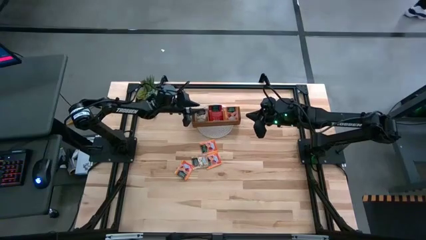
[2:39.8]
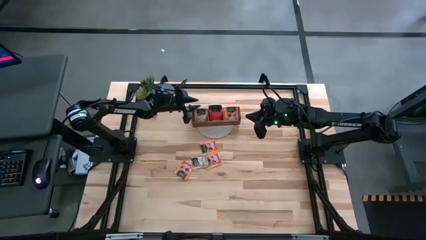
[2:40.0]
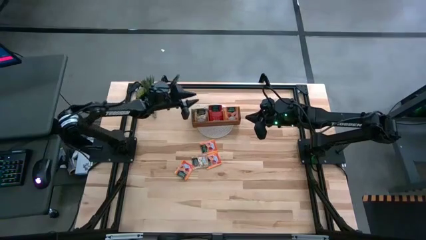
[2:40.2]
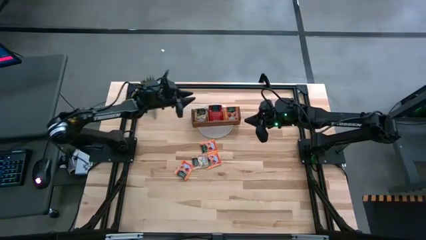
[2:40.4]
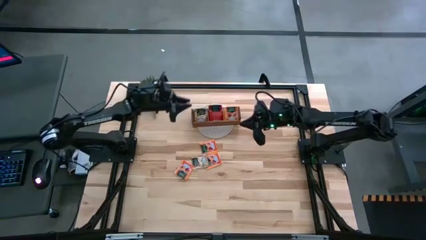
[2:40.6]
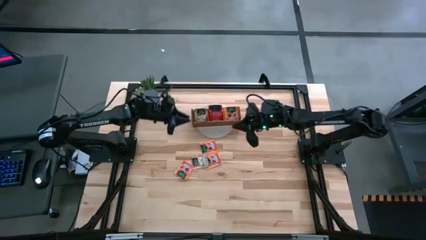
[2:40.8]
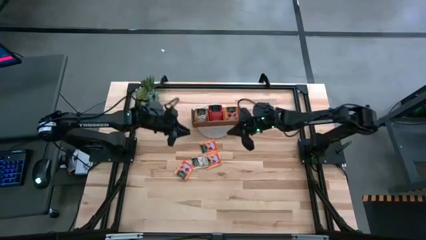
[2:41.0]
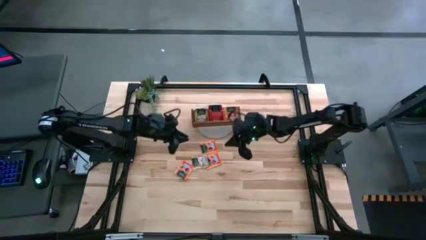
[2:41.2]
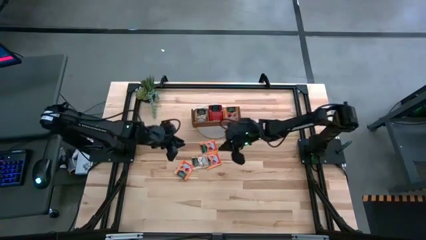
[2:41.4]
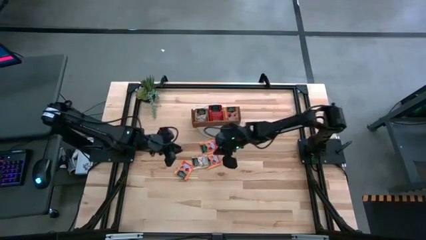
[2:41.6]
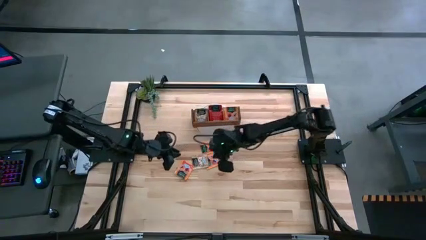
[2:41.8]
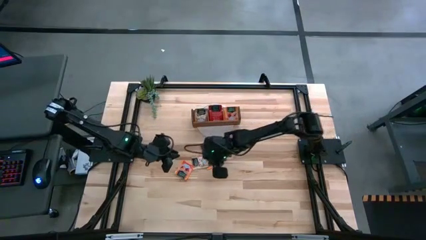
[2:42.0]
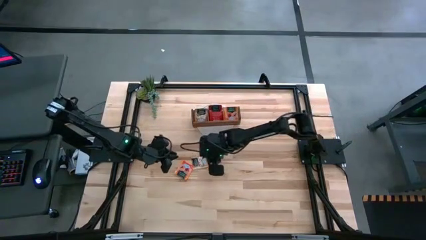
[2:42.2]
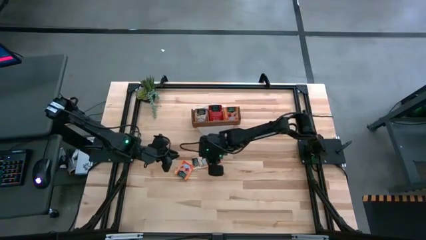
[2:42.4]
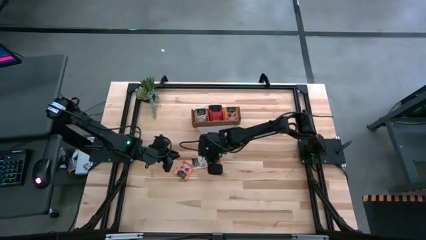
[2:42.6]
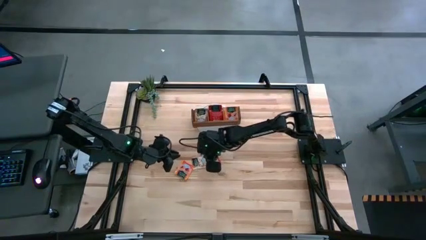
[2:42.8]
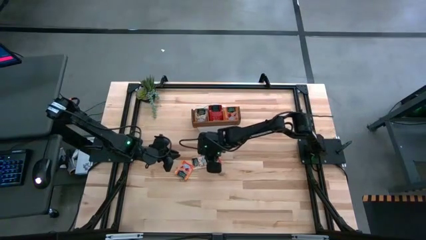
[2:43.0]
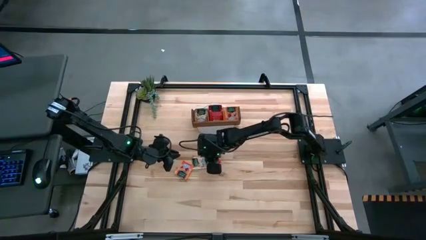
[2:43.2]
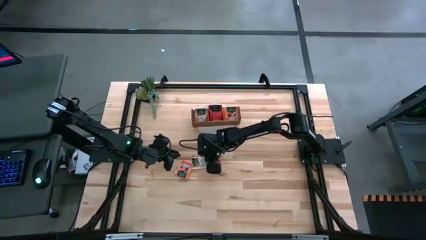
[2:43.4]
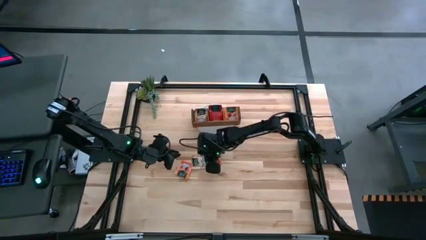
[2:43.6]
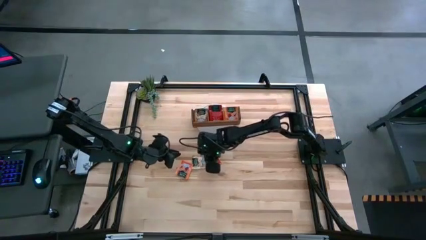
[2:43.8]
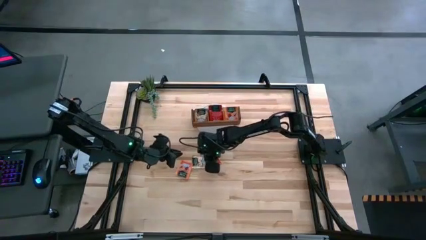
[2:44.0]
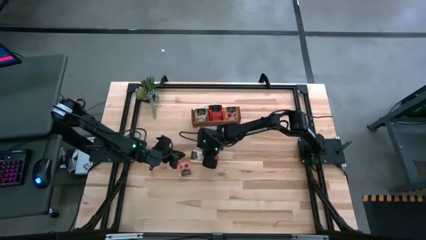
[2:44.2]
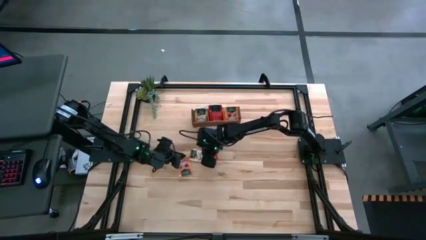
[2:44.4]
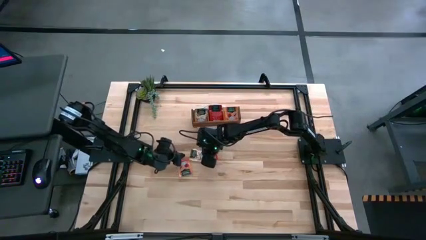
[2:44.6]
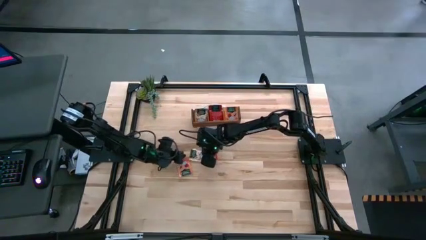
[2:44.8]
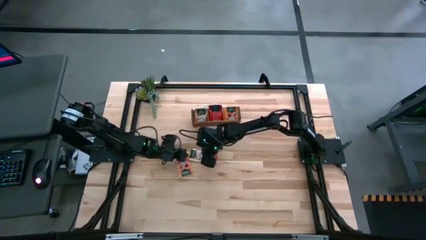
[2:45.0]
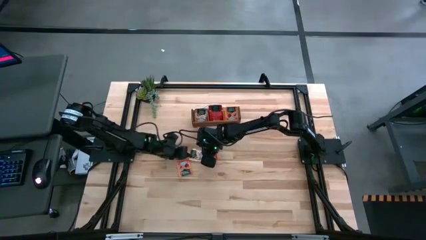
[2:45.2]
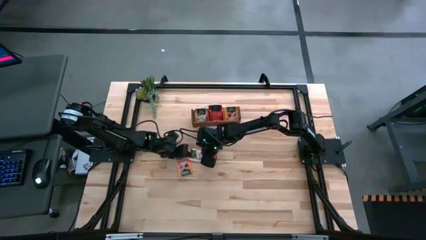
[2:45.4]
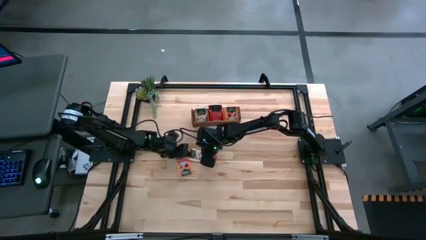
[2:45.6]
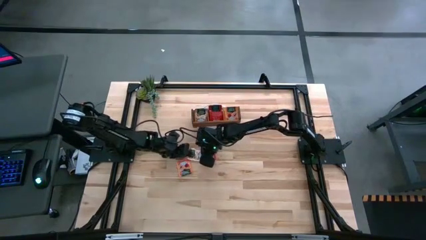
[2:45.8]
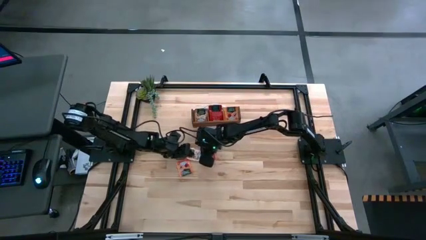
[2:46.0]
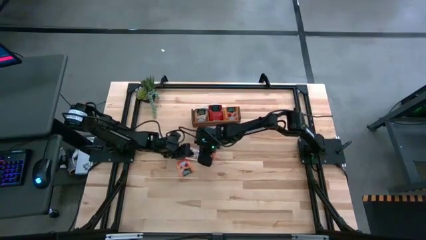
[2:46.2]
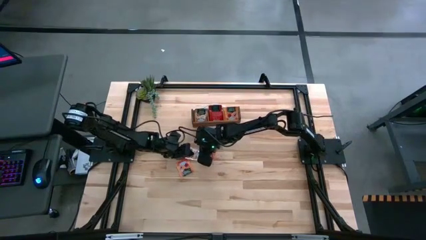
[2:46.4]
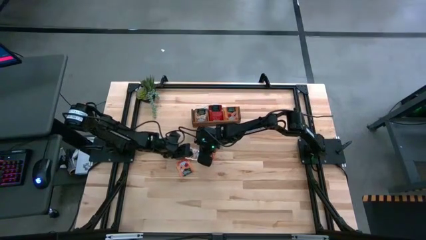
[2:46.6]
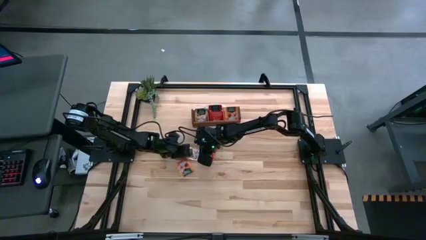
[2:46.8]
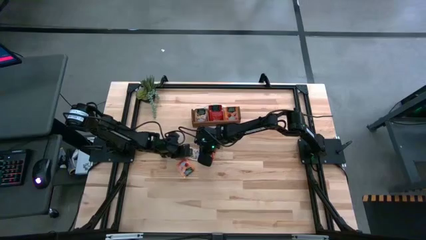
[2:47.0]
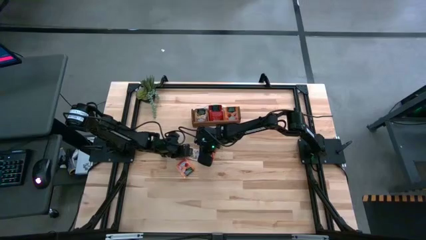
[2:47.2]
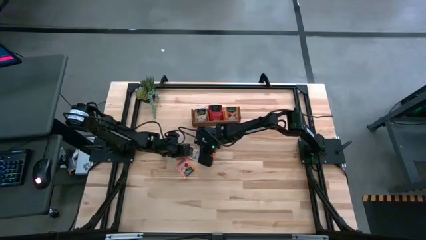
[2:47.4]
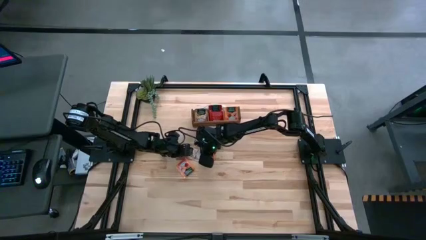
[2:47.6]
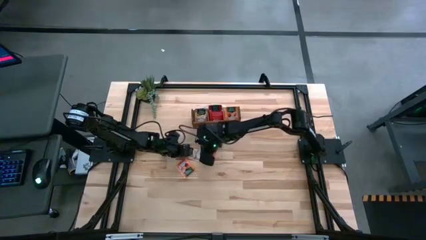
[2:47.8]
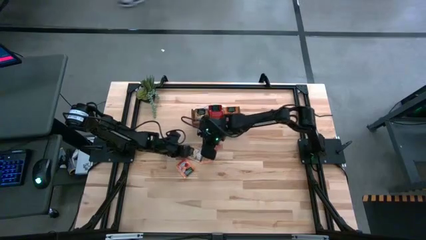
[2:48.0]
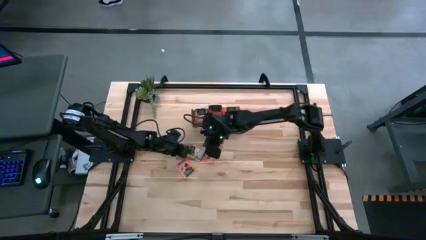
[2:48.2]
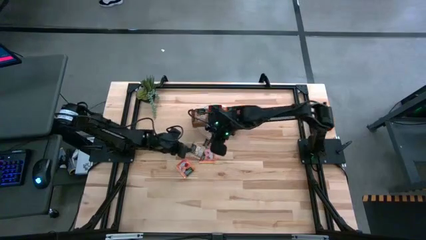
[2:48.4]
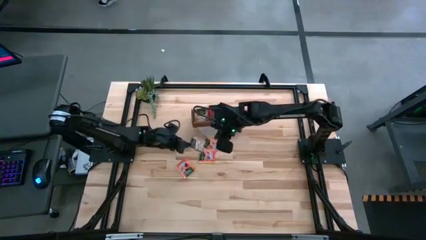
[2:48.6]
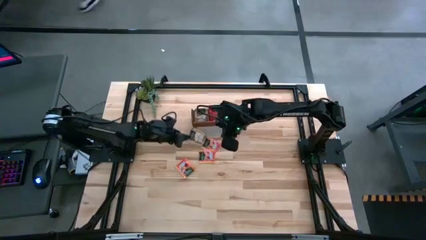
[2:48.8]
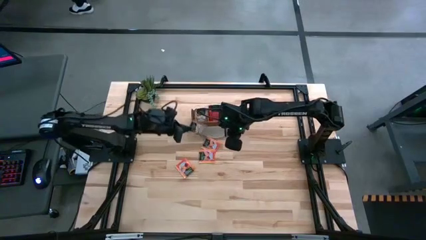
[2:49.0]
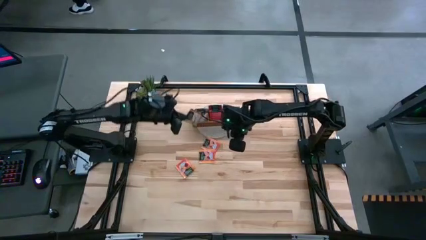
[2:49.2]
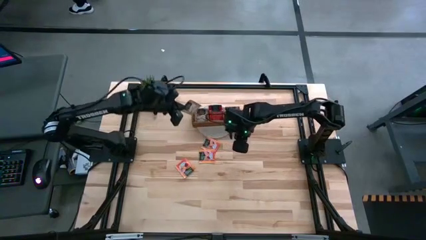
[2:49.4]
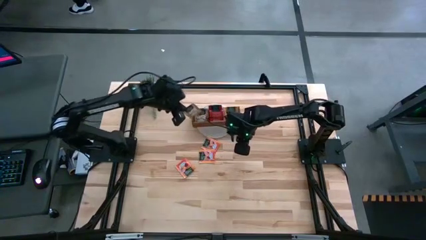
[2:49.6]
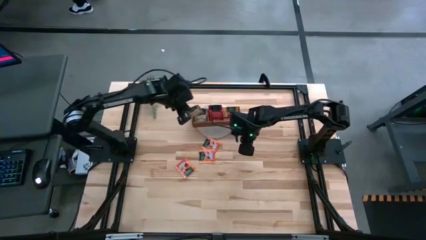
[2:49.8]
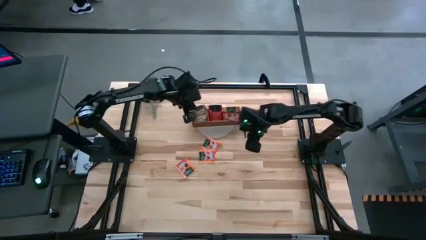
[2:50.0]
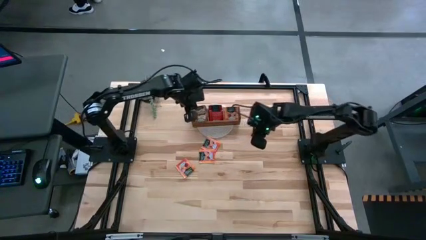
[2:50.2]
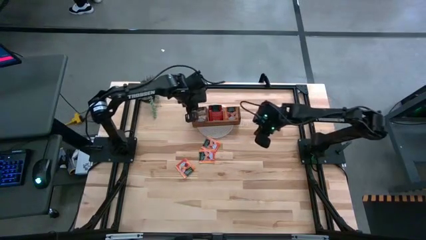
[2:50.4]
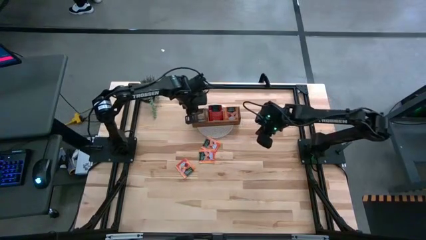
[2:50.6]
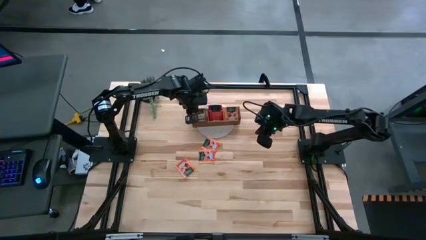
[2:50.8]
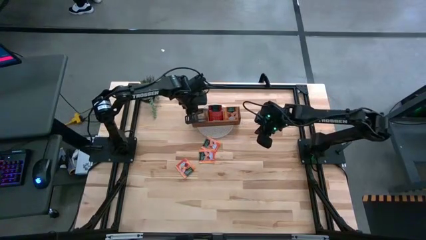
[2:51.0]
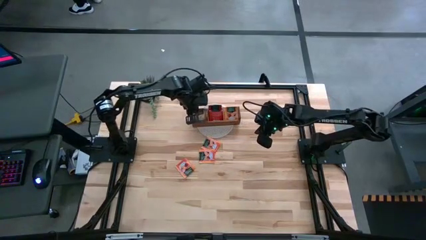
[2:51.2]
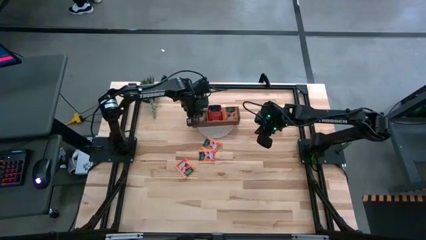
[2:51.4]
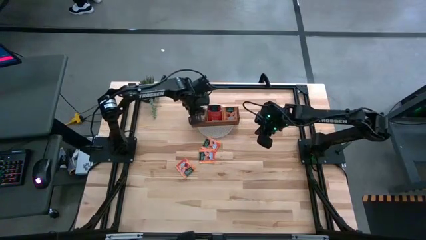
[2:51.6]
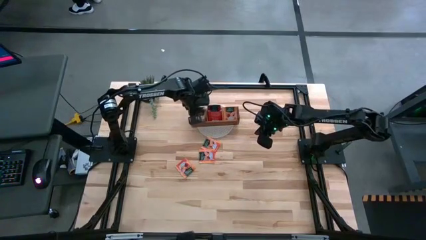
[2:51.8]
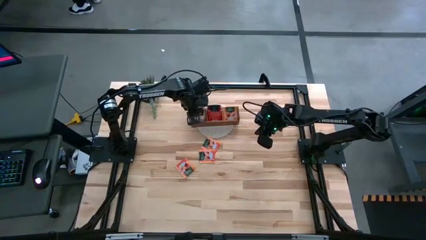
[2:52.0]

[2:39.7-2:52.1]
Task: Pick & Place Tea
Put the brown tea bag in the left section of the wooden organizer

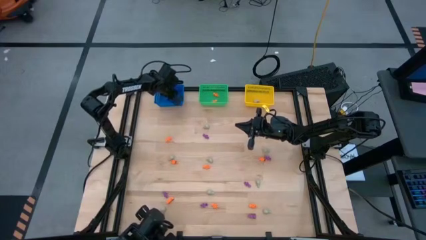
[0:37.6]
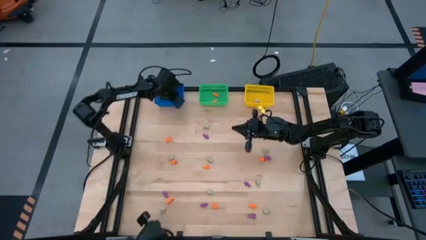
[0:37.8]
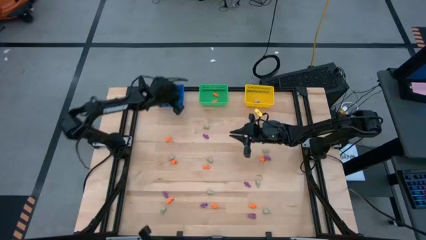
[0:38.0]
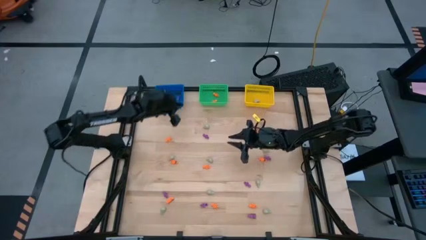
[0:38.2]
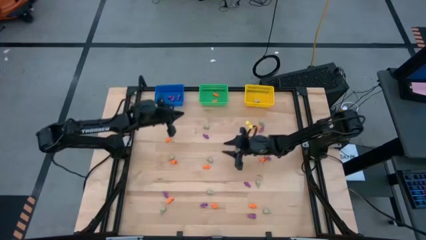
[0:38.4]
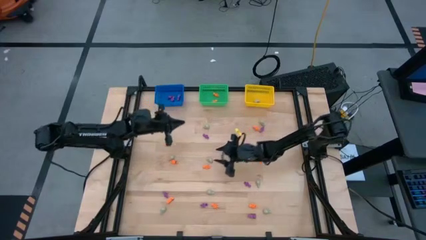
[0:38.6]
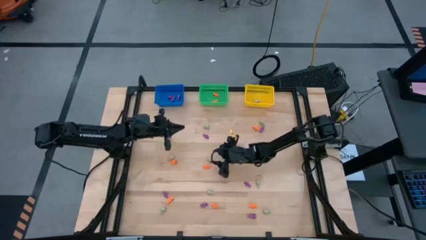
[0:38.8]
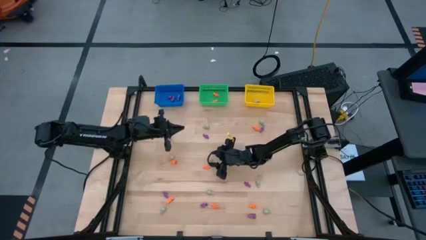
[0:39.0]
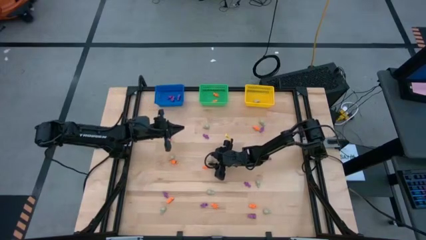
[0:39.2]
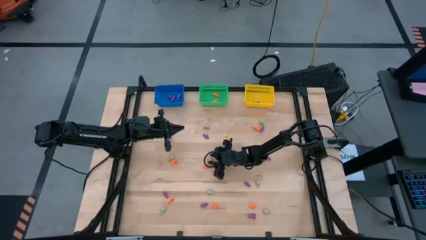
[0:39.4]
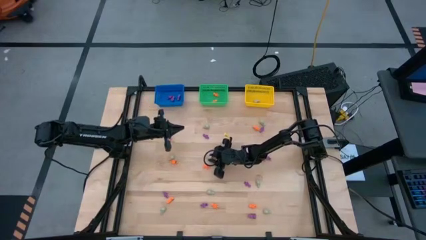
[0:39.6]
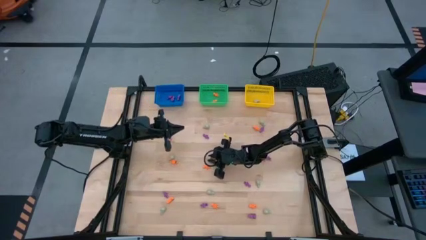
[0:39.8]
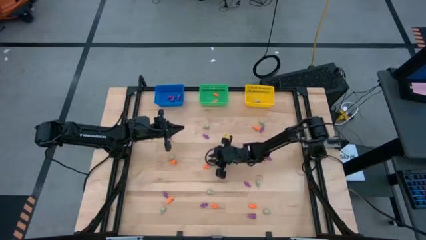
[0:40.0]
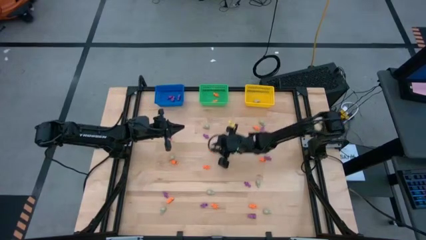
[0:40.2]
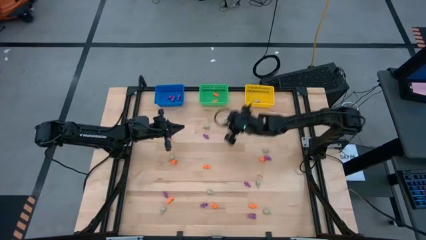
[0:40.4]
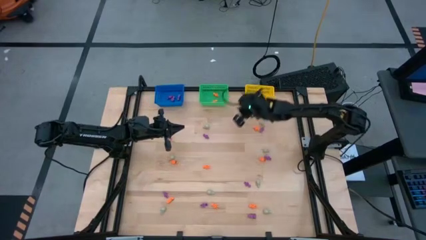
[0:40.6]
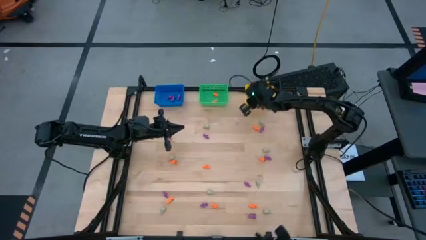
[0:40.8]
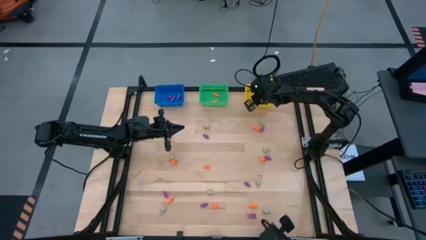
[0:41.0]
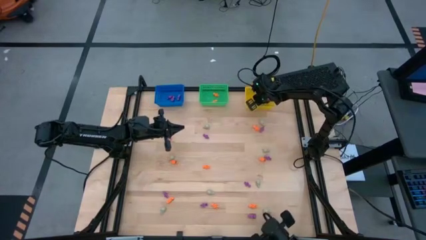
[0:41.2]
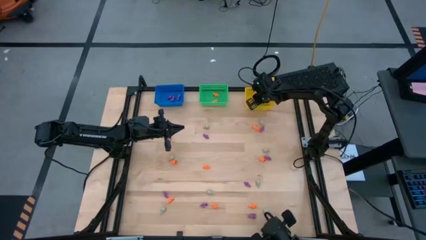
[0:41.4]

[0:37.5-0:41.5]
Task: Sort Halloween decoration
Put the grey skull toy into the yellow basket
